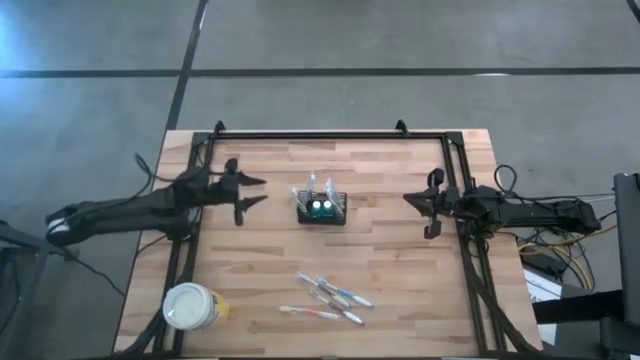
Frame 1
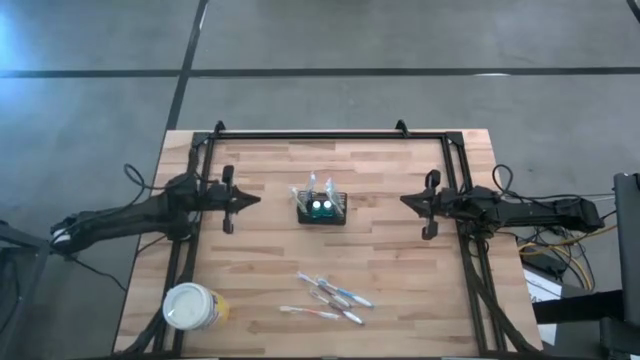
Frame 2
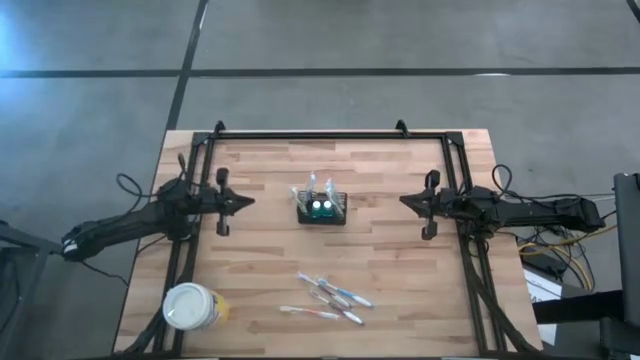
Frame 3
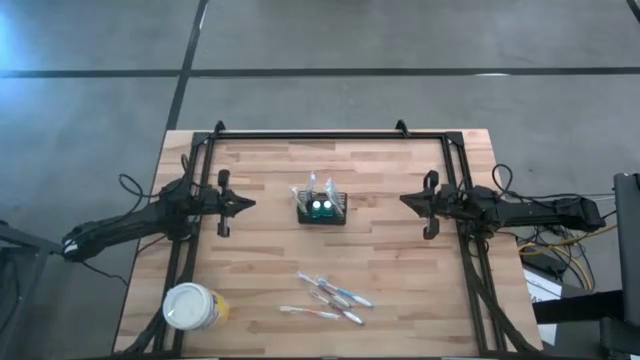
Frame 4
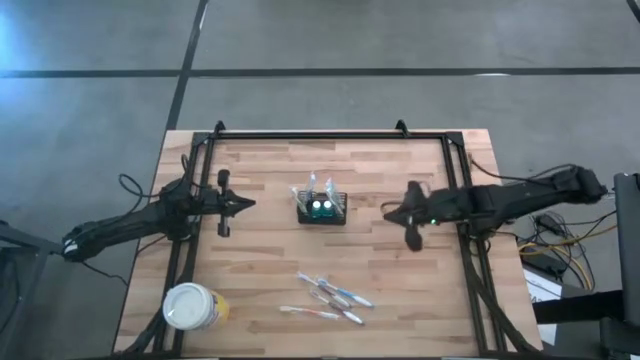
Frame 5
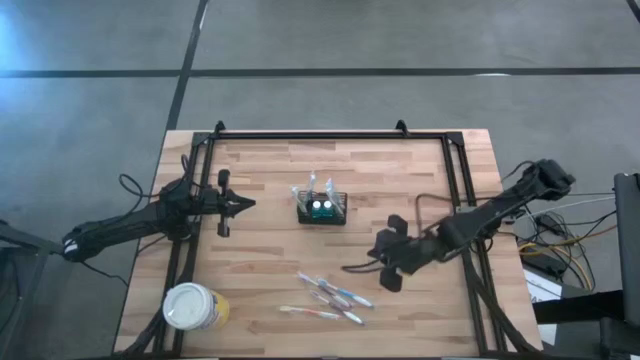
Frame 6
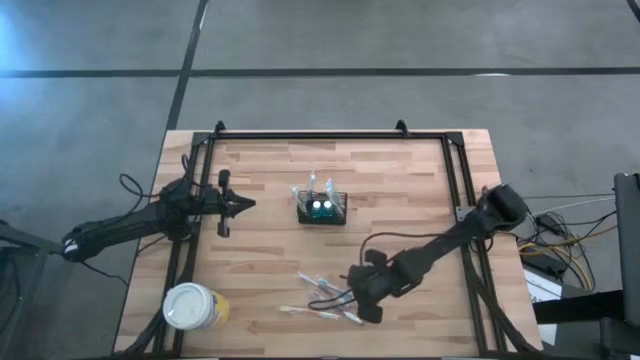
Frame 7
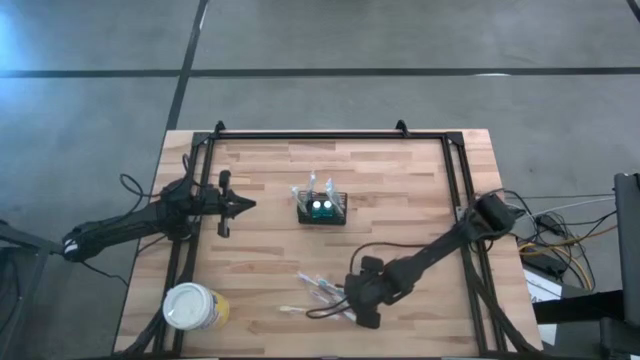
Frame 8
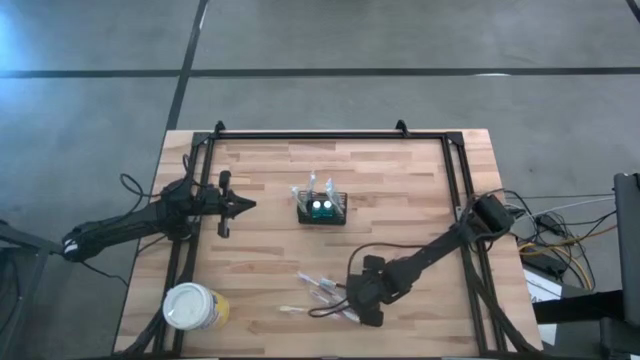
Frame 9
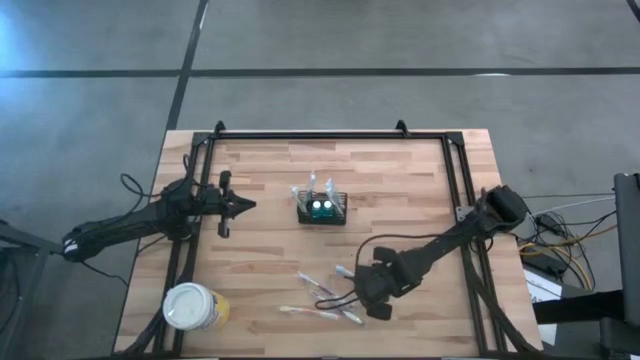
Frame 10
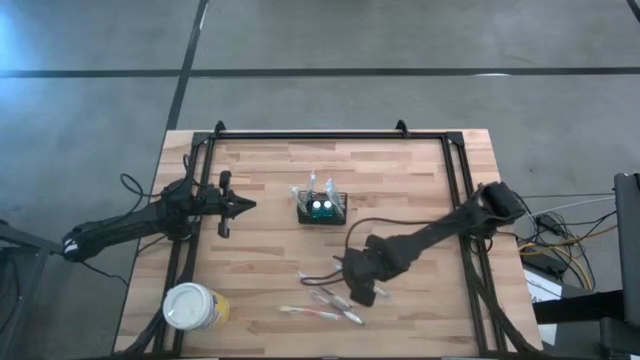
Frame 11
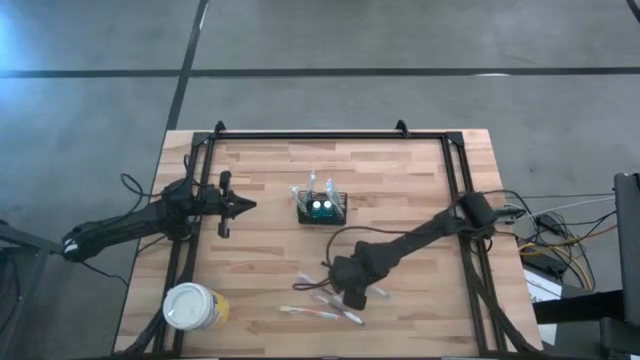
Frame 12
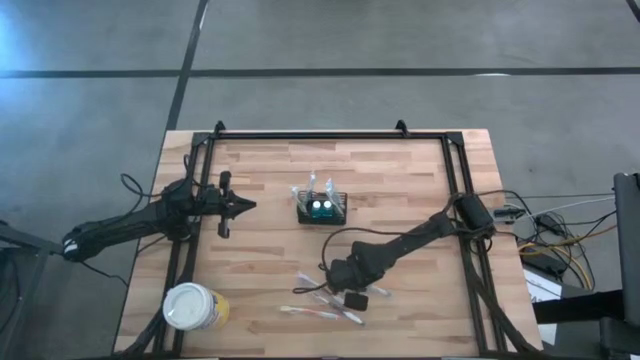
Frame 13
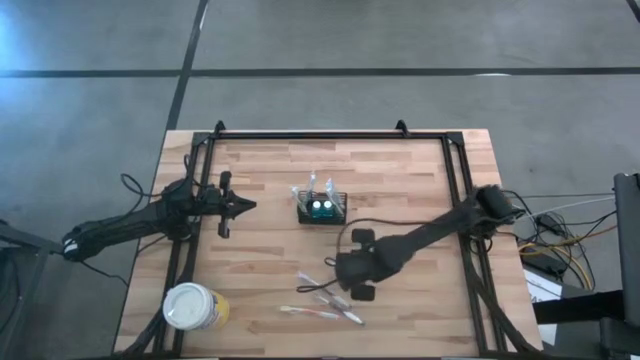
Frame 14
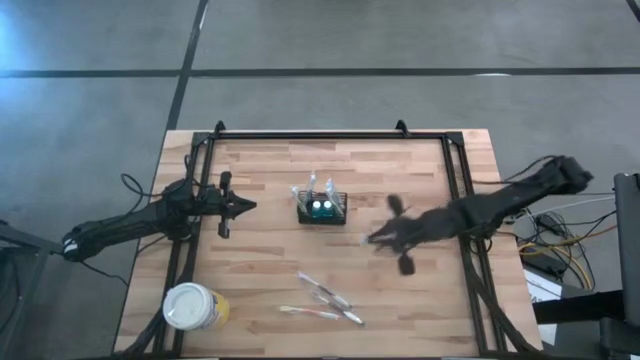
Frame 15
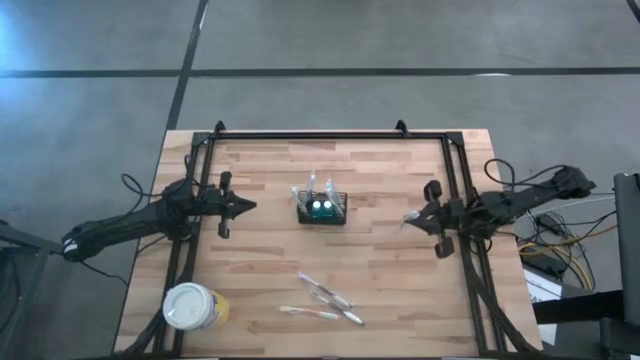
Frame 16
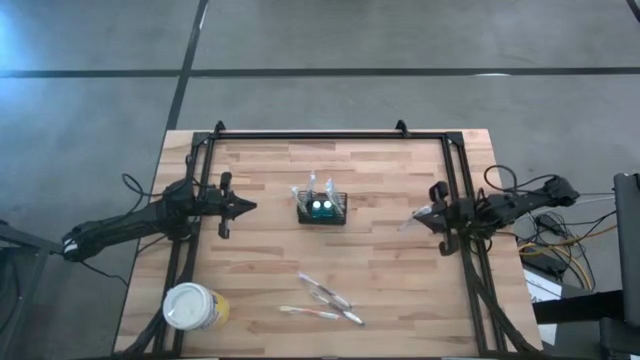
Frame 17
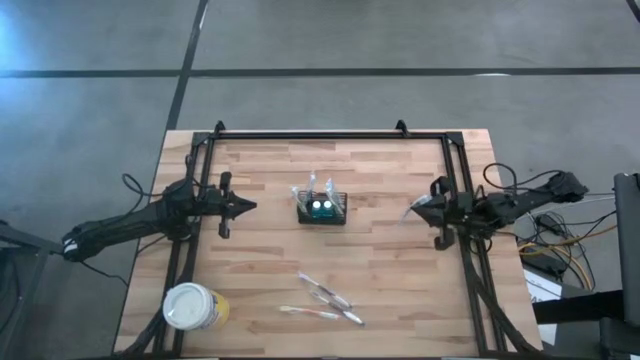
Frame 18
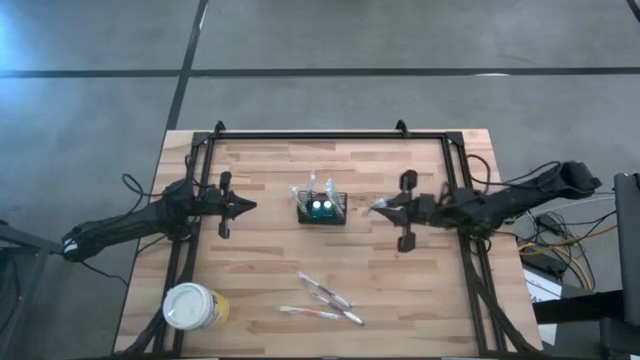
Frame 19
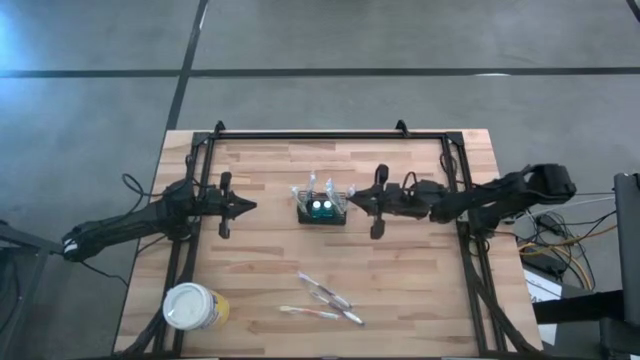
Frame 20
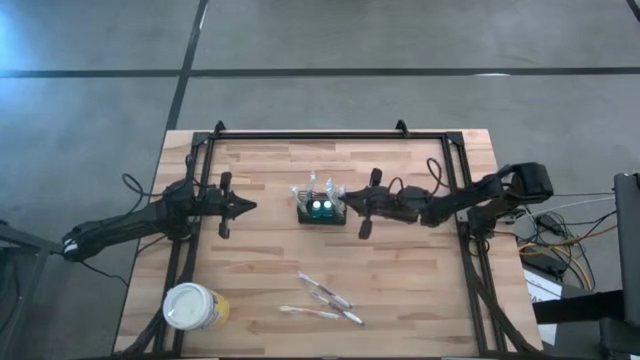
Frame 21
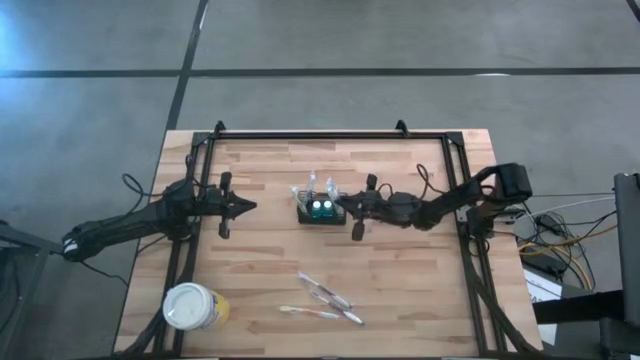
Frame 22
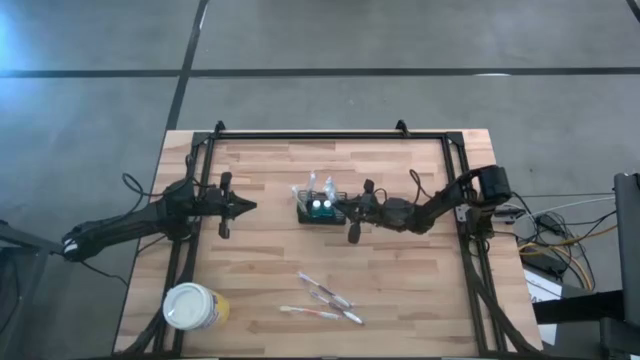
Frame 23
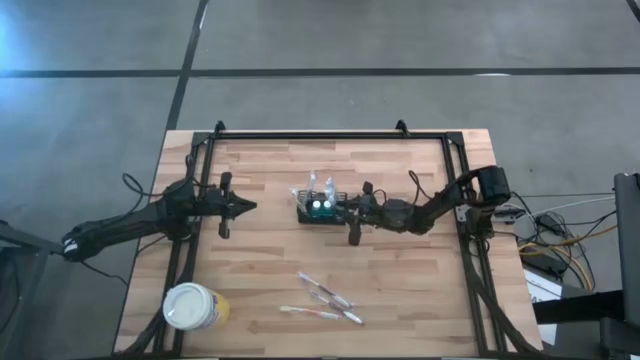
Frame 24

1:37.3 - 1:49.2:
Task: Pick & Place toothbrushing station
Put the blue toothbrush into the wire organizer

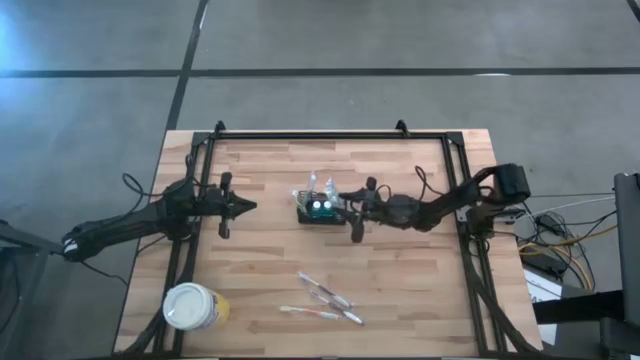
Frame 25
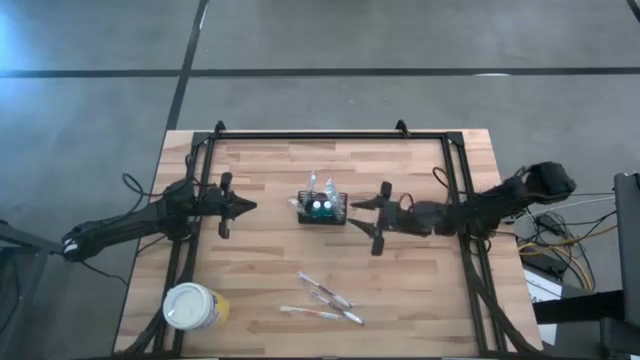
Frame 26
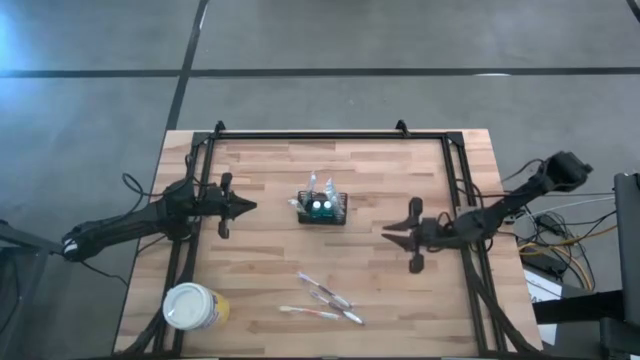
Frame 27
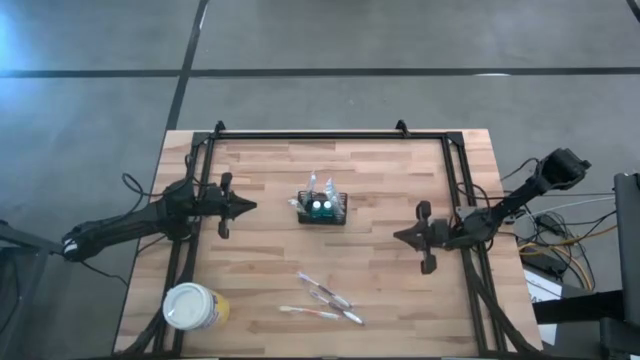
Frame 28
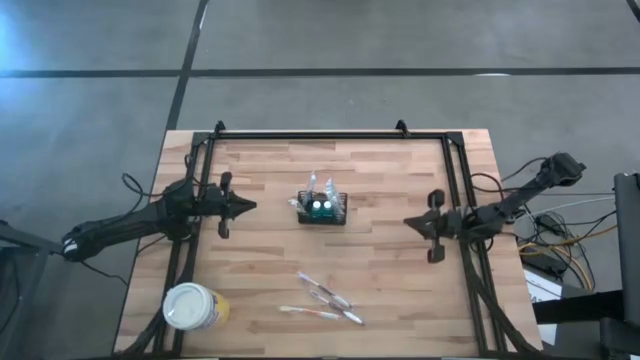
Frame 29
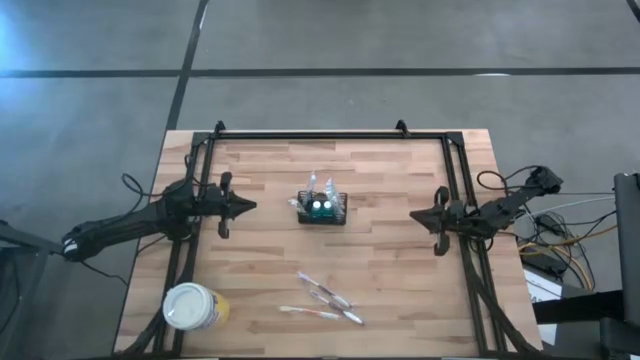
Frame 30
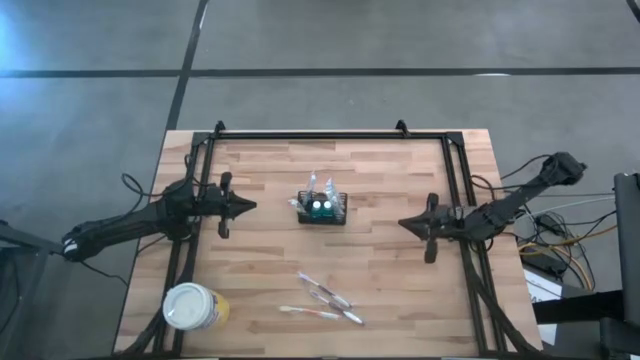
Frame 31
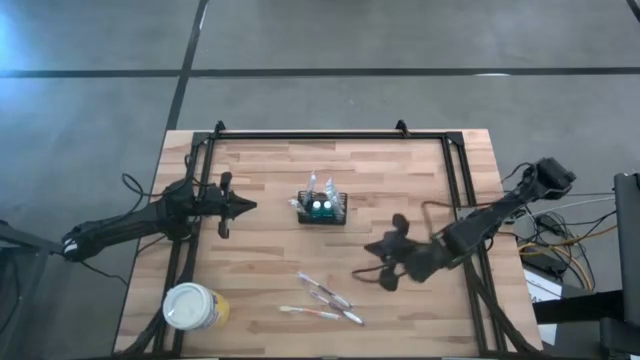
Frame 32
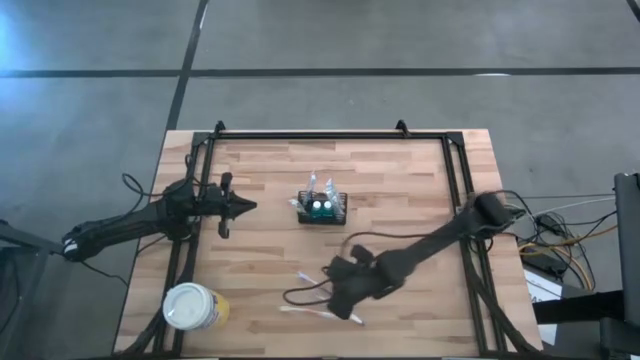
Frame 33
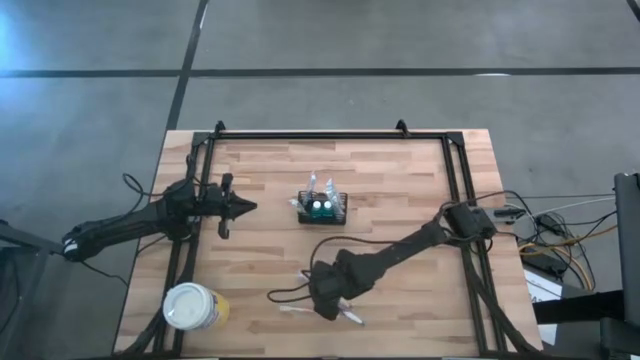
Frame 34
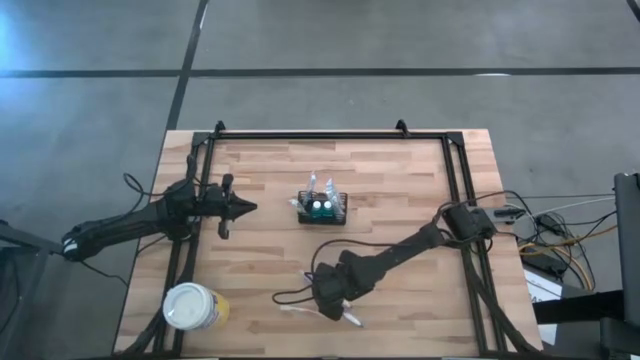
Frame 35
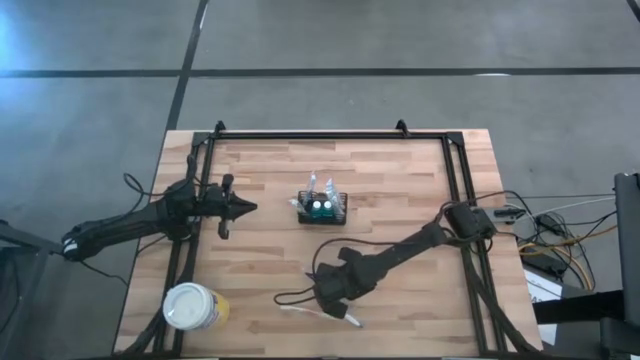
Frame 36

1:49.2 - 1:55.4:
Put the violet toothbrush into the wire organizer

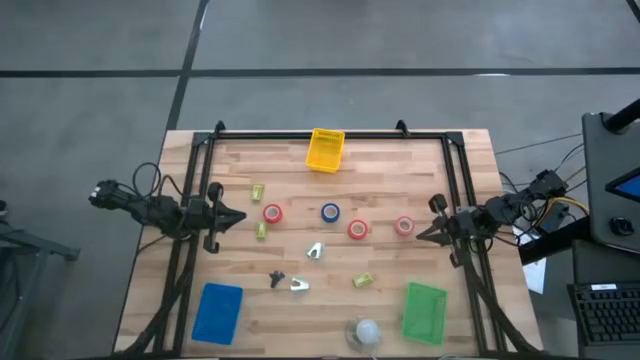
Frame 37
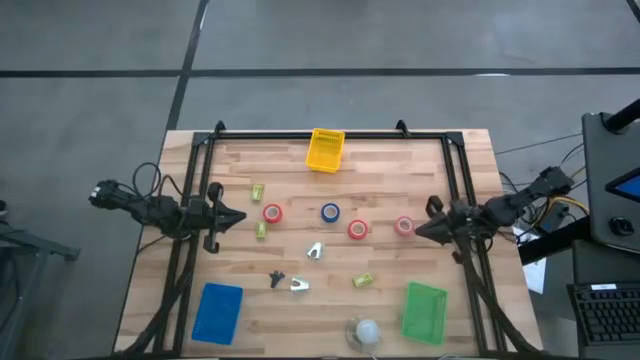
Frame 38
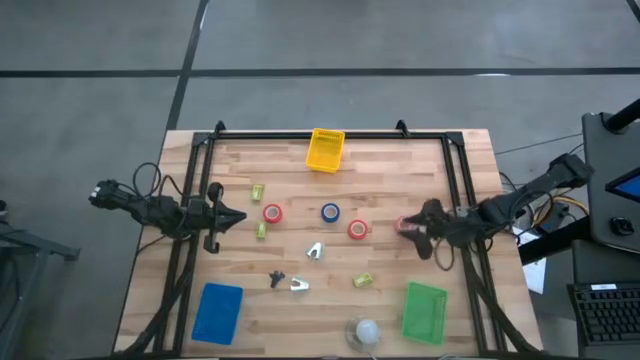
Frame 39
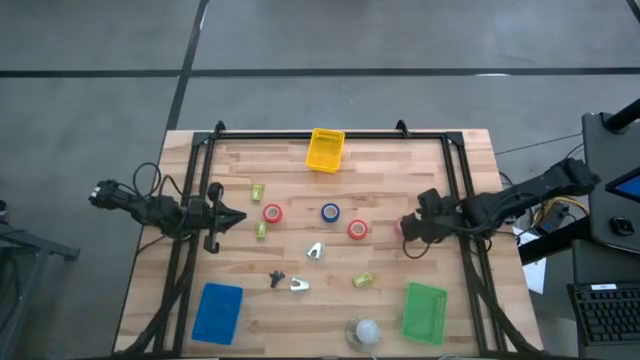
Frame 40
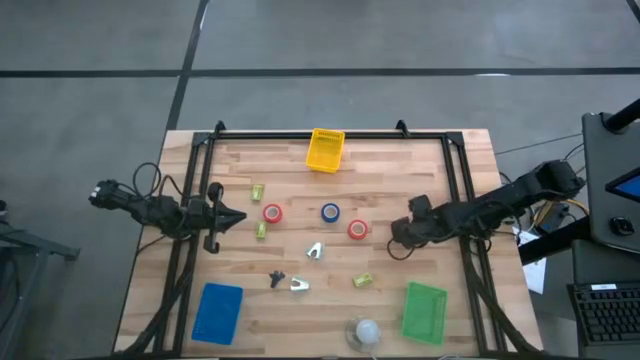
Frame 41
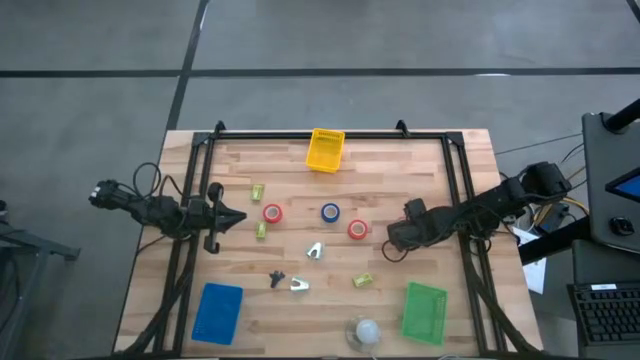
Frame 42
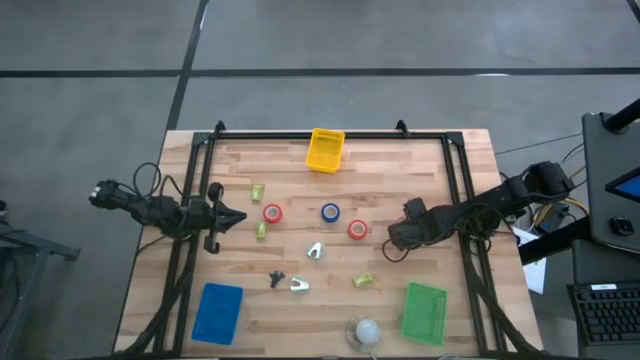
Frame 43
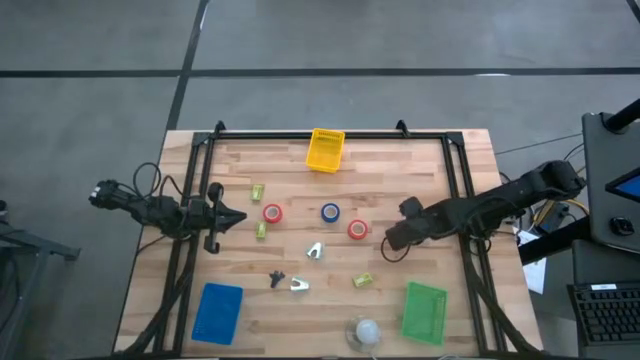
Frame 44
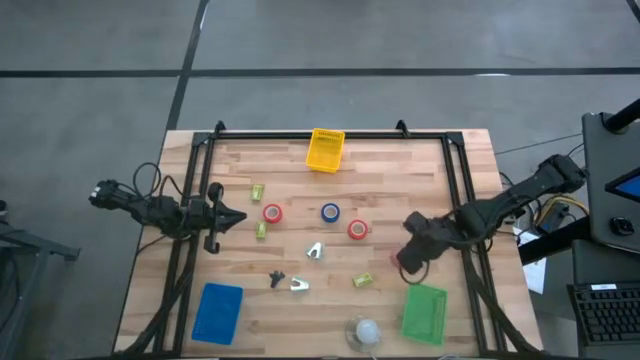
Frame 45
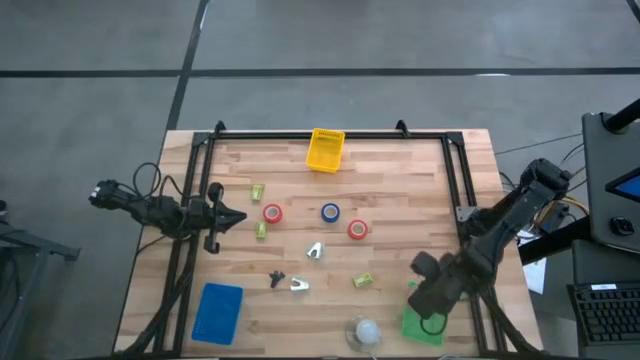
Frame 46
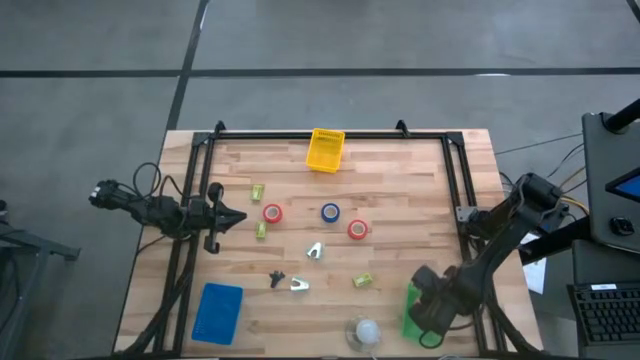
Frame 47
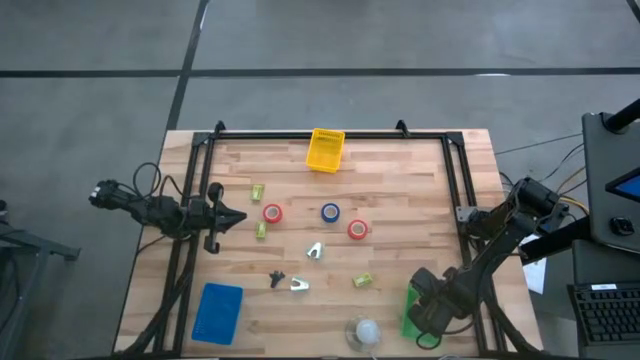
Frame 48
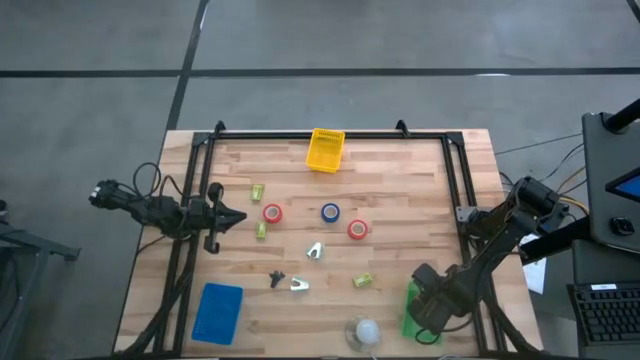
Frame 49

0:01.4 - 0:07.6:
Task: Pick and place Stapler, Stapler remover, tape
Put the pink tape into the green bin
